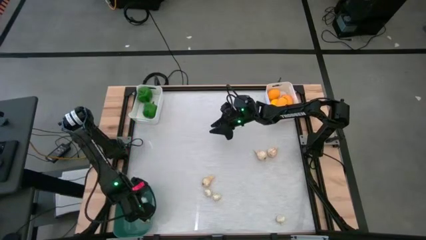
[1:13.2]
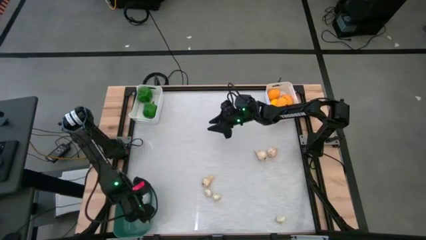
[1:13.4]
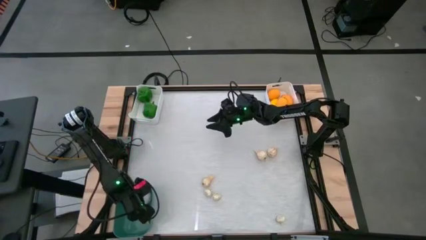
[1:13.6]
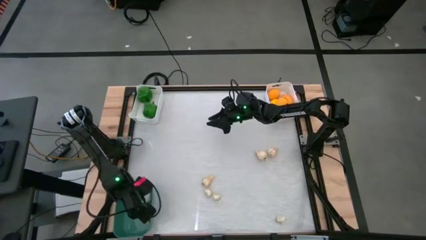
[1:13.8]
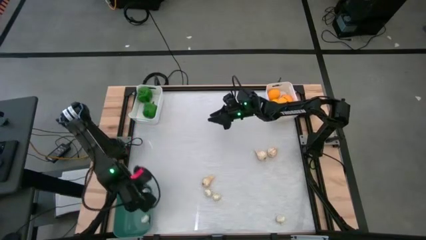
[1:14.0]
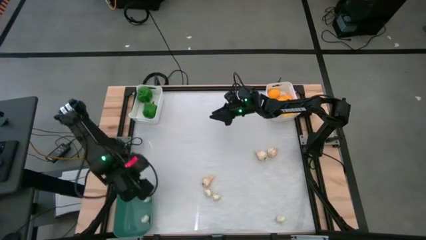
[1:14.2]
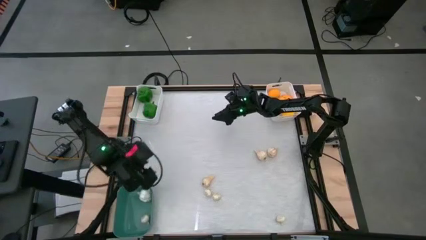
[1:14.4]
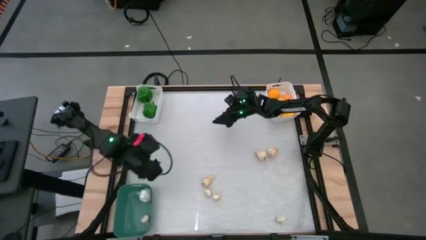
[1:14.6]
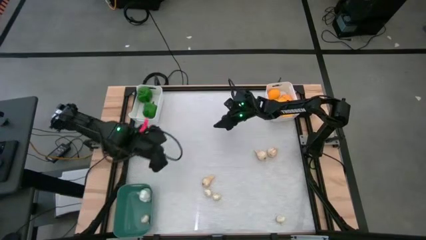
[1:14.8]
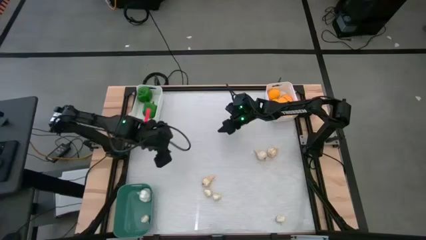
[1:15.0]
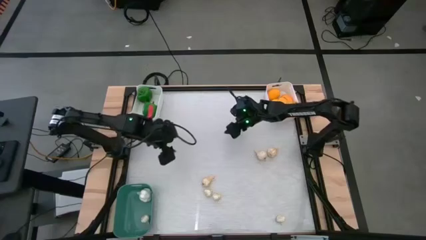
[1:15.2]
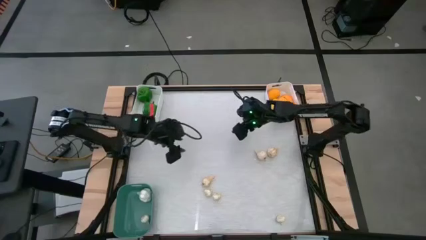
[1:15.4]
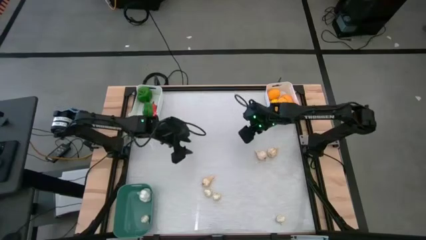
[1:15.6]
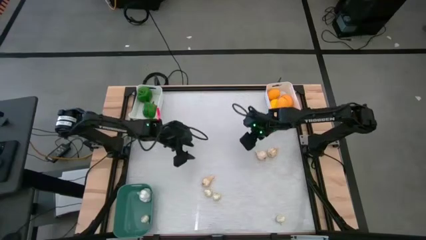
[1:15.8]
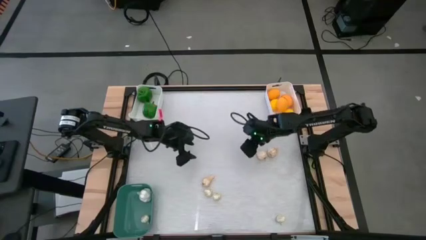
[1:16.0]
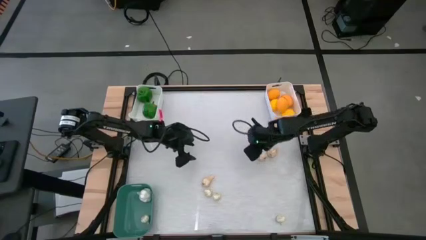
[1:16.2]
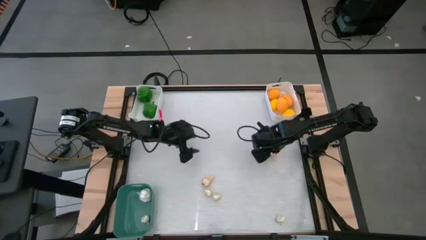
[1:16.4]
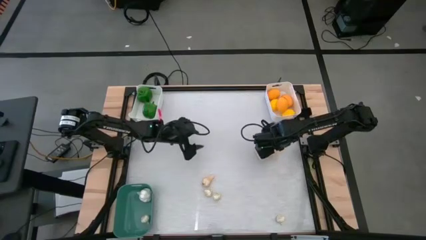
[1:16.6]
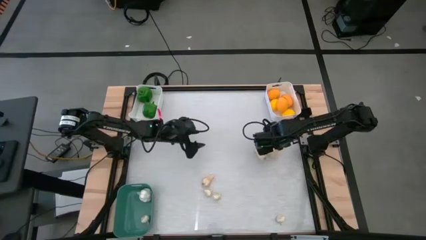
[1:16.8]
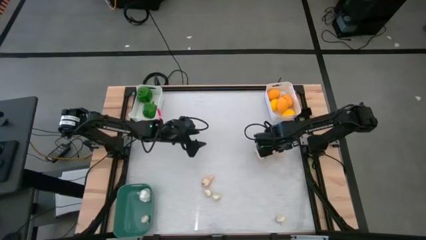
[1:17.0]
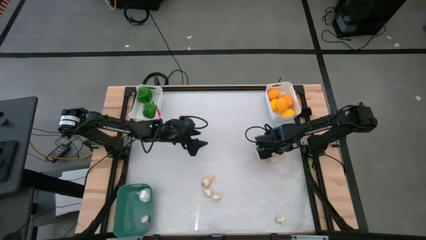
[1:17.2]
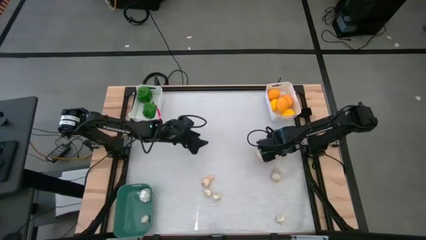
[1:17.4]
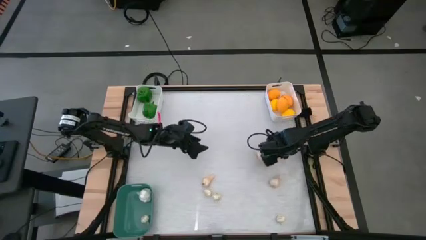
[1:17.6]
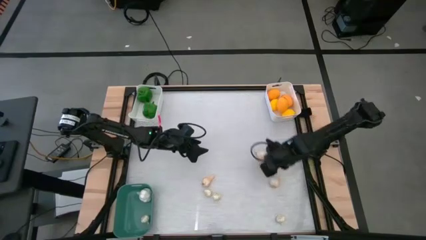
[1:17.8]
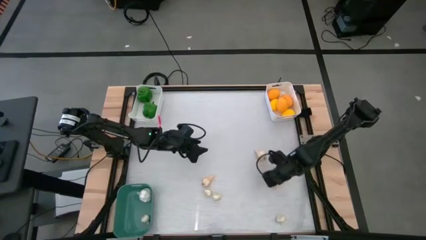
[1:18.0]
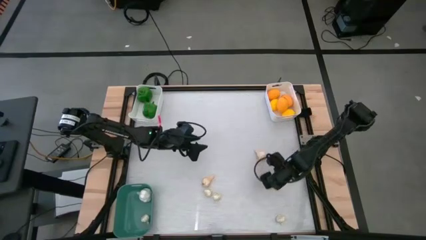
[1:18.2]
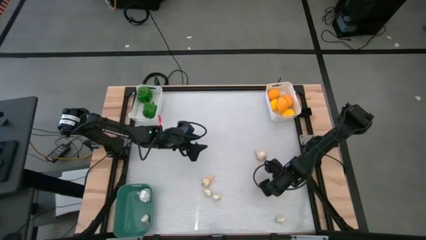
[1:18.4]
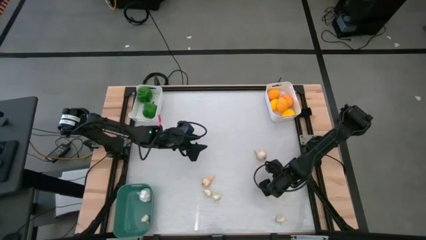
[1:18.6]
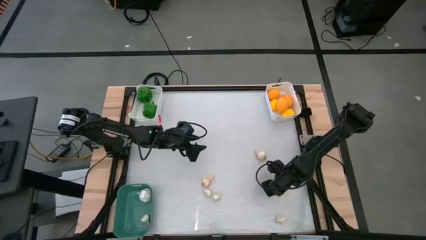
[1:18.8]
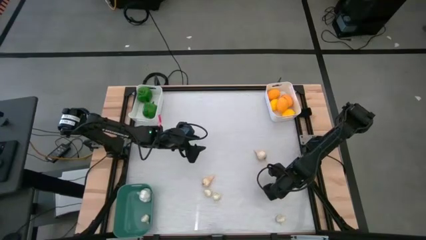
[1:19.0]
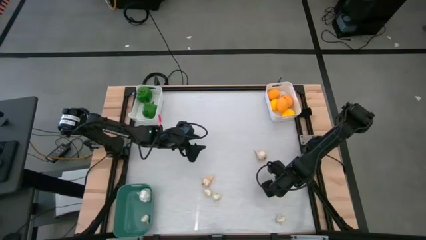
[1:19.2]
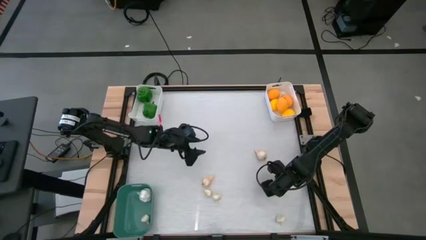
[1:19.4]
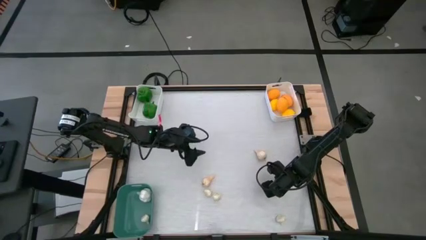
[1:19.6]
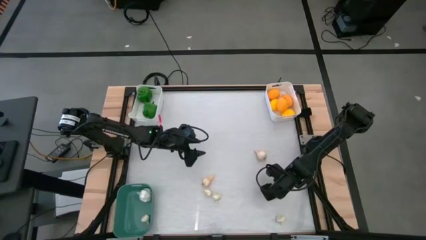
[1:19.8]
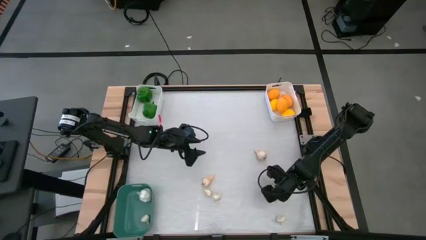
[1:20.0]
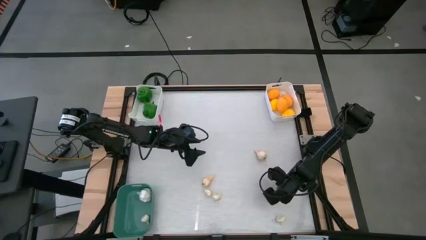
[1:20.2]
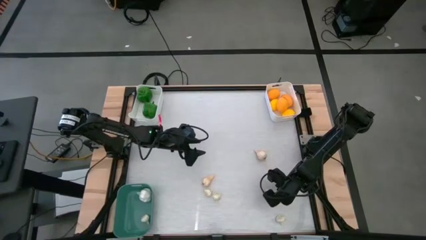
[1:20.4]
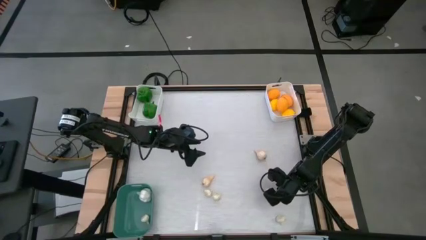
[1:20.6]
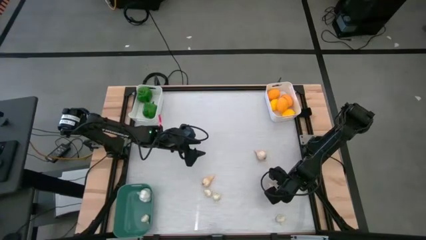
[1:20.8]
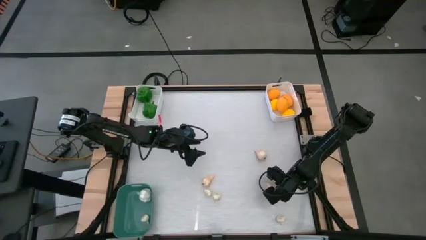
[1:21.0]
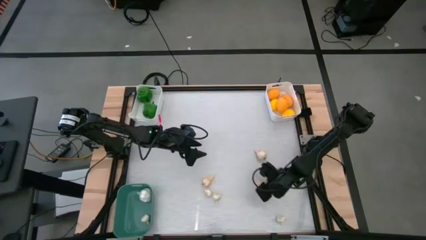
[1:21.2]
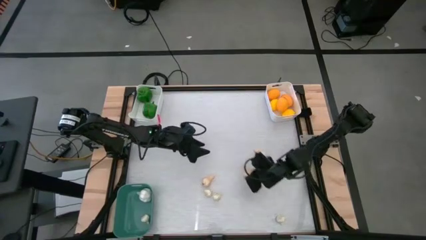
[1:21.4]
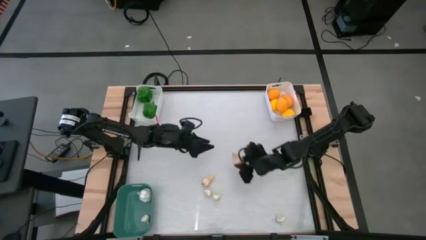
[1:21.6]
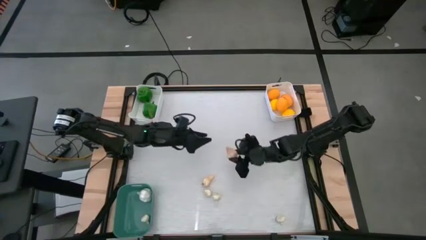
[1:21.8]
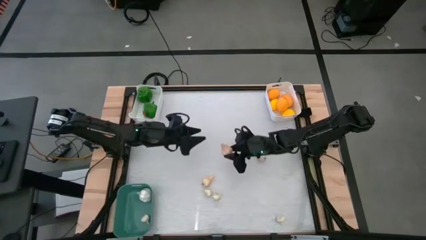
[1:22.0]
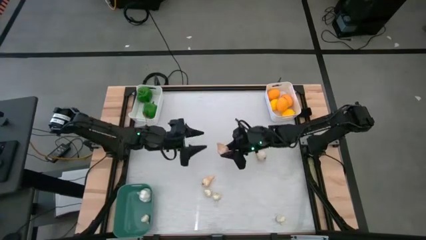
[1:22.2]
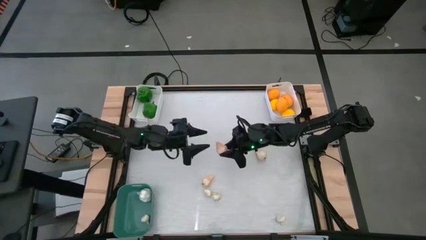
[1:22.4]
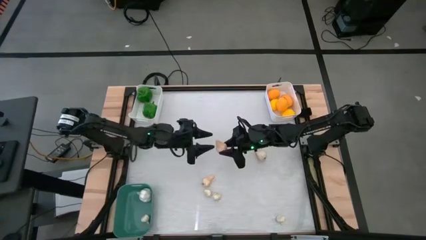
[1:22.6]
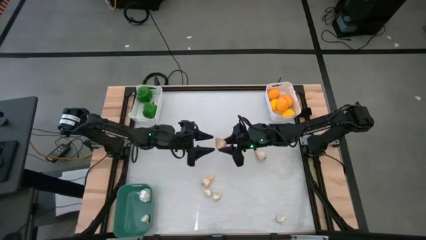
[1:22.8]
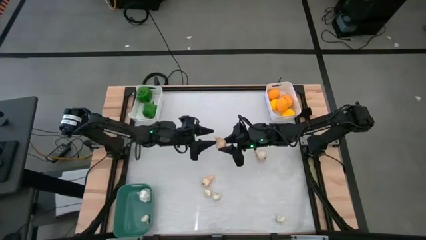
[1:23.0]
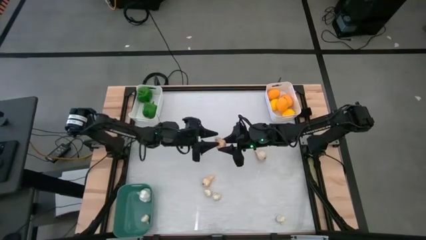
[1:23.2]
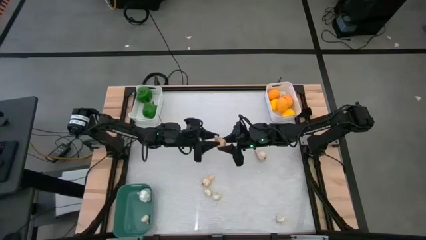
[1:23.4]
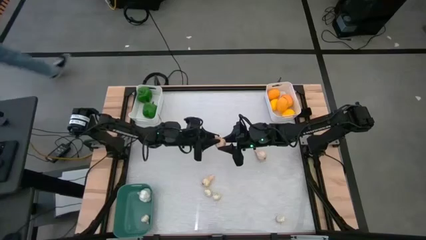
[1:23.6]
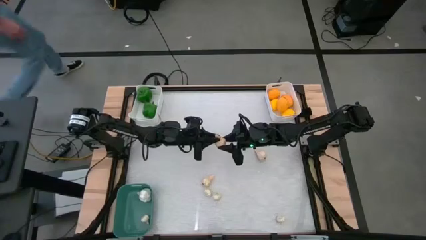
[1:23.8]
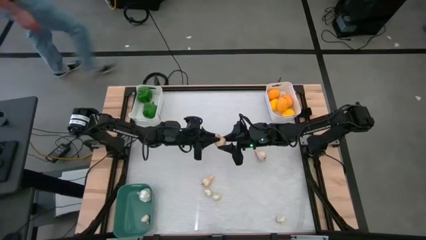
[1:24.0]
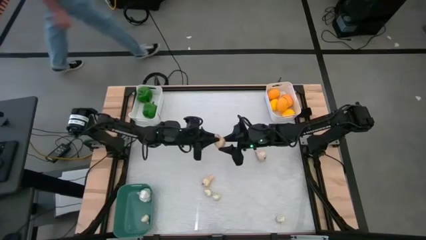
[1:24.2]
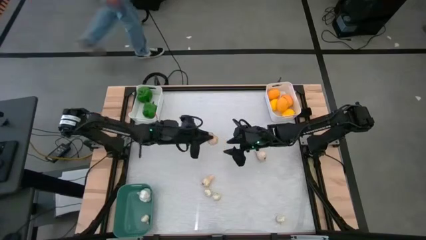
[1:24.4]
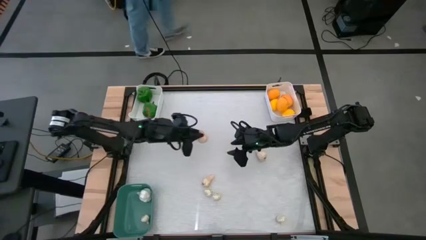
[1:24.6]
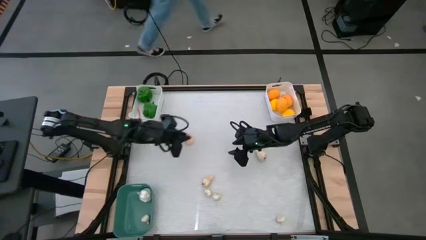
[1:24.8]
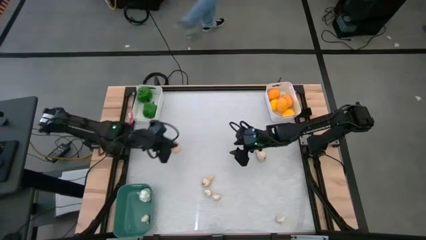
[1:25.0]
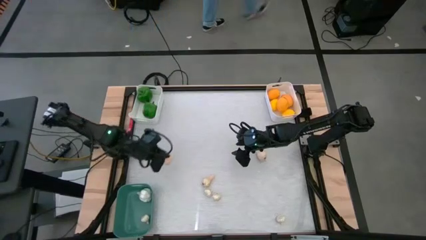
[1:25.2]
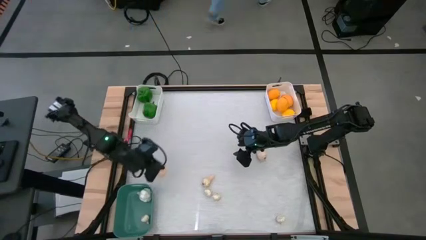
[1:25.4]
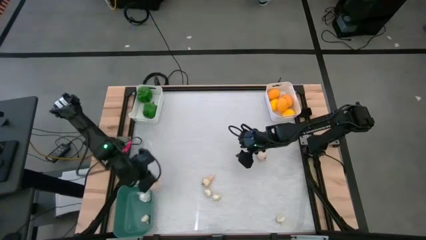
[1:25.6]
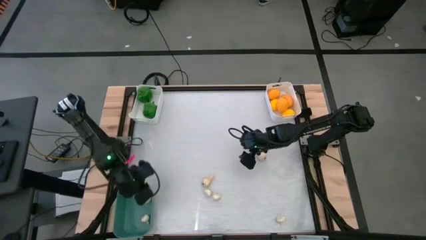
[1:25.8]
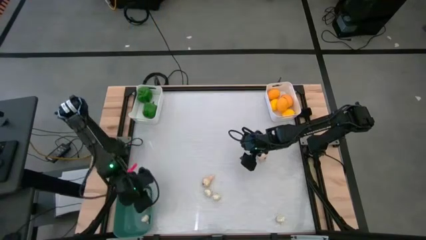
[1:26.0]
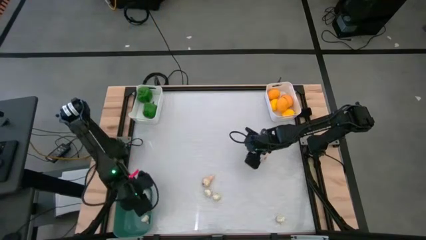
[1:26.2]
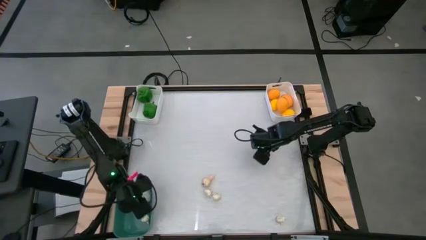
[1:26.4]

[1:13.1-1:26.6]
Task: Sort produce into baskets
Put the white garlic into the green bin

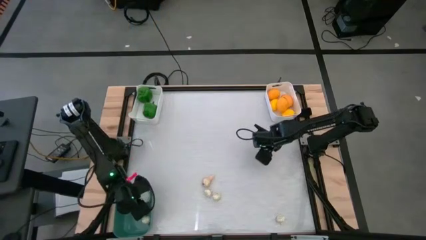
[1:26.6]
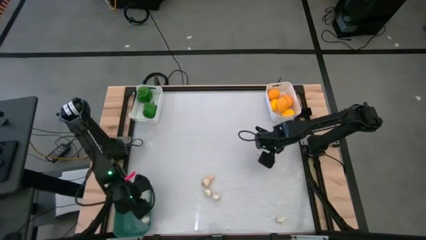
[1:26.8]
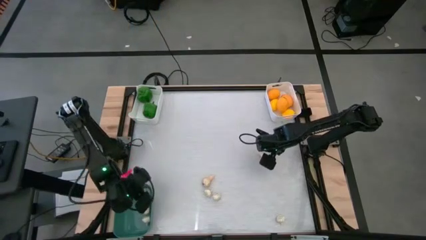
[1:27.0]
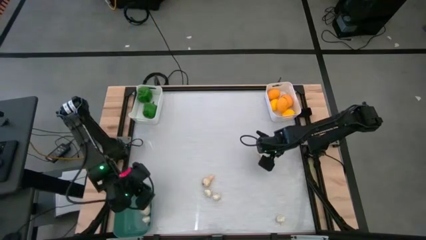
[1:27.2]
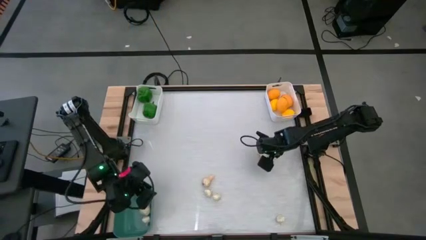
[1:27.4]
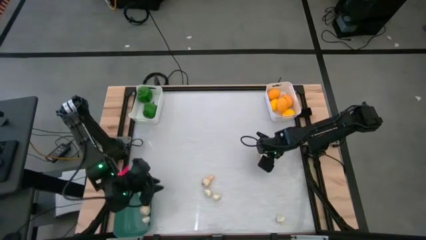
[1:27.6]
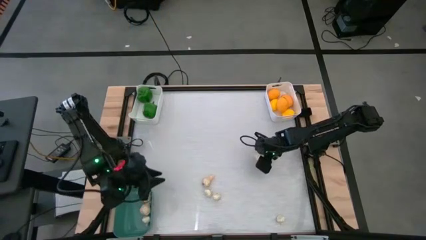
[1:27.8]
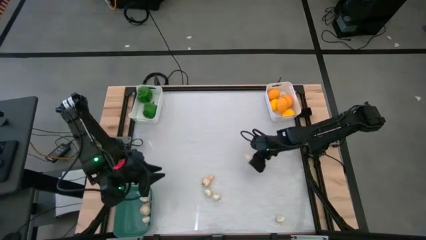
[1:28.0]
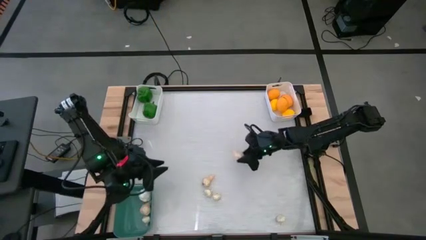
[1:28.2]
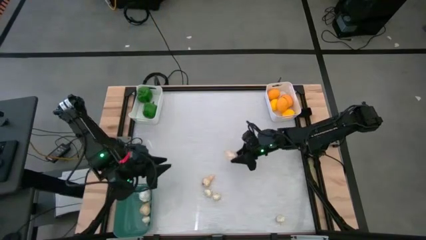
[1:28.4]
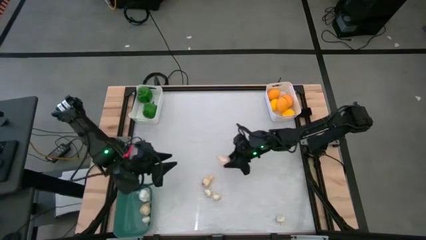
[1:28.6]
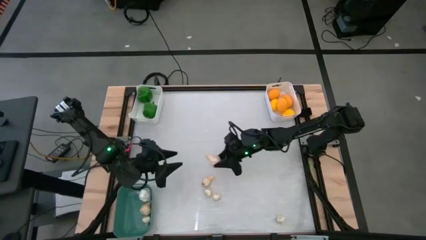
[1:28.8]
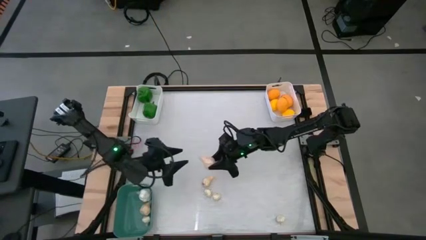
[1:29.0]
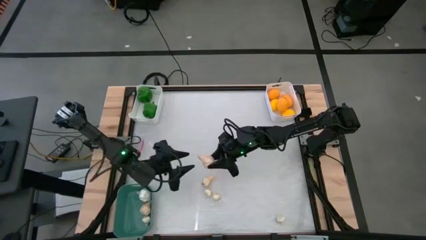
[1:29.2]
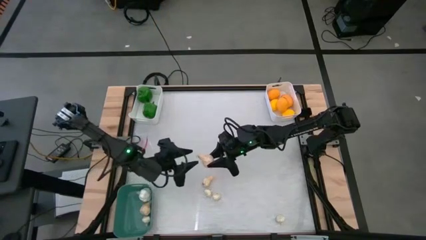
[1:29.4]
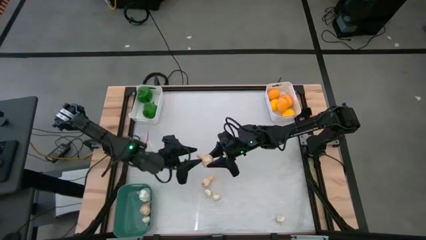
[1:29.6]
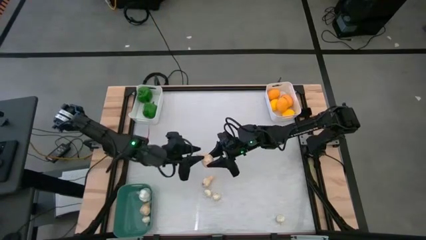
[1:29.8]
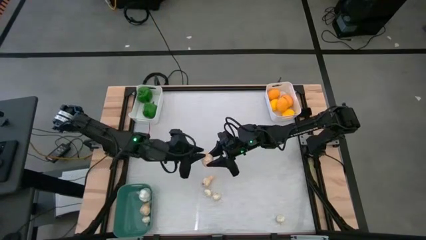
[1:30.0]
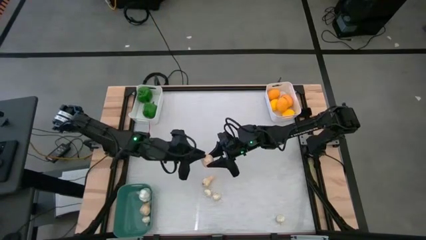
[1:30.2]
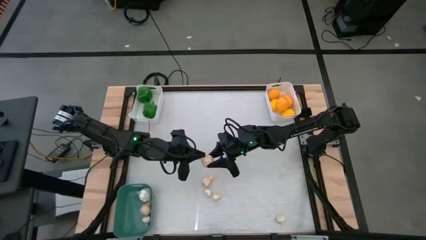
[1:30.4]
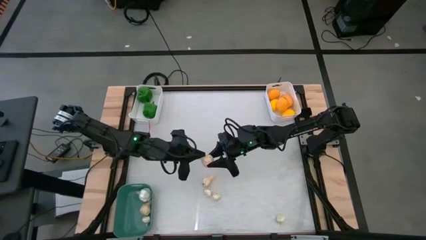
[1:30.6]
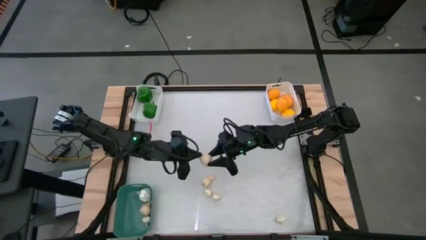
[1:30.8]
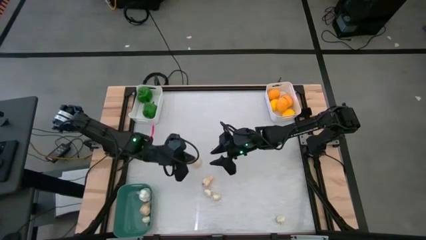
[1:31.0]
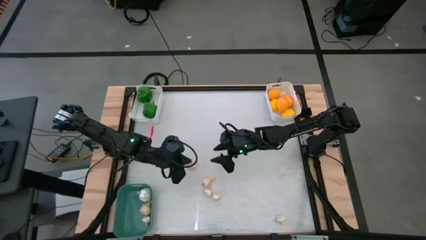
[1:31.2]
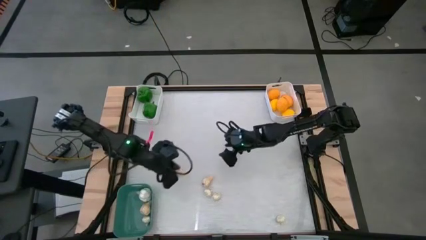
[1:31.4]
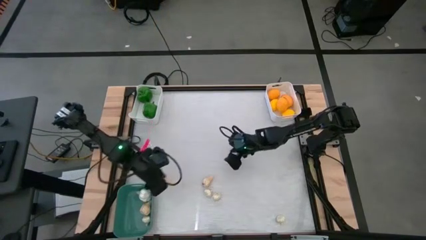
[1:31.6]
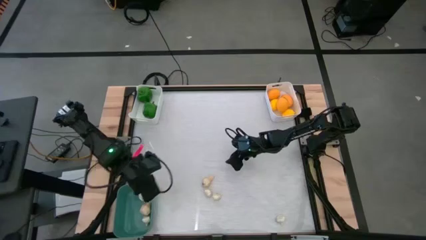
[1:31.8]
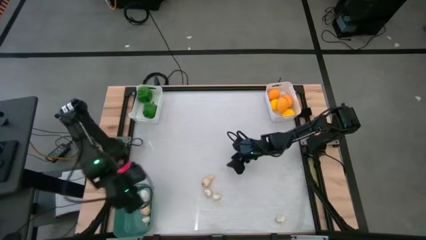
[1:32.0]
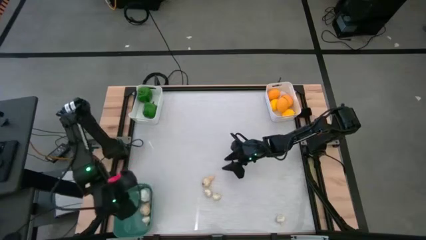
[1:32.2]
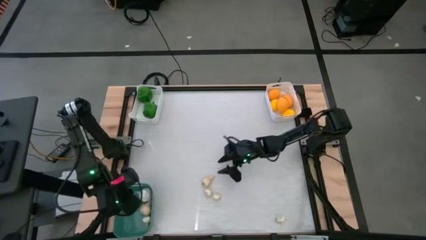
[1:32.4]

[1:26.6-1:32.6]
Put the white garlic into the green bin
